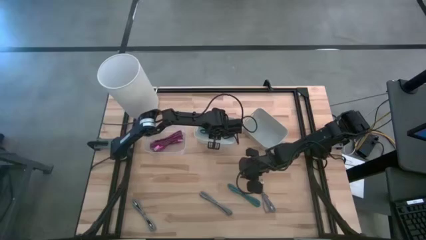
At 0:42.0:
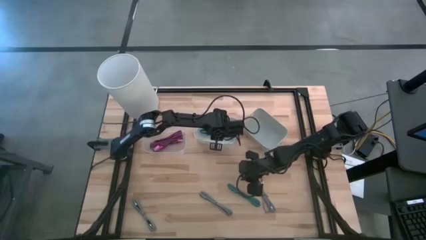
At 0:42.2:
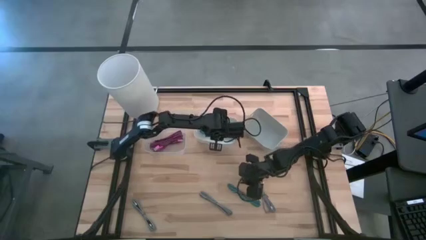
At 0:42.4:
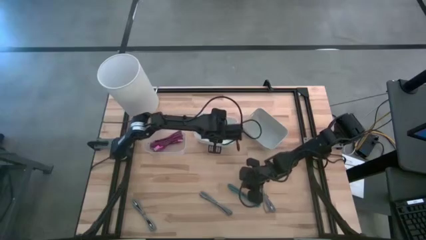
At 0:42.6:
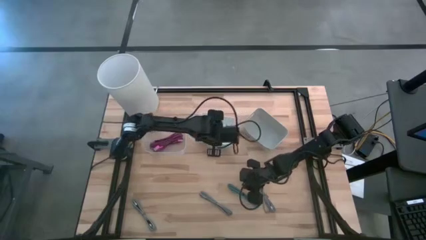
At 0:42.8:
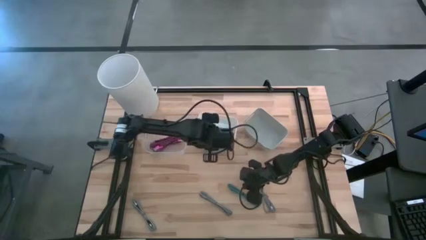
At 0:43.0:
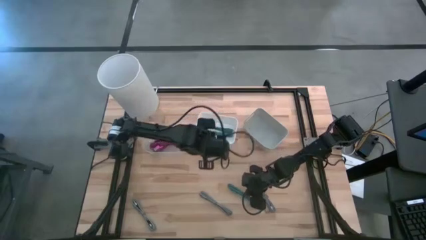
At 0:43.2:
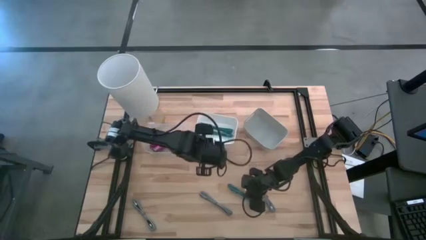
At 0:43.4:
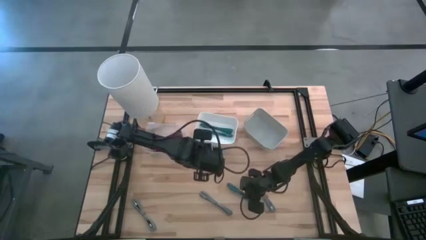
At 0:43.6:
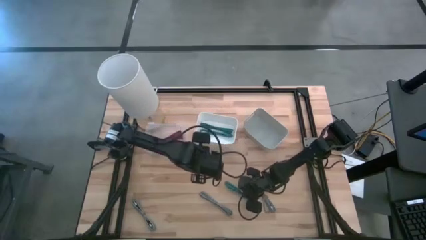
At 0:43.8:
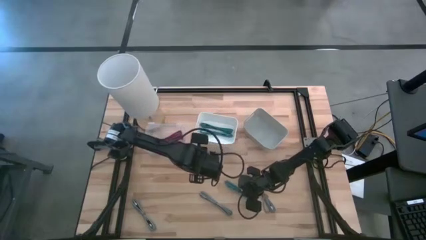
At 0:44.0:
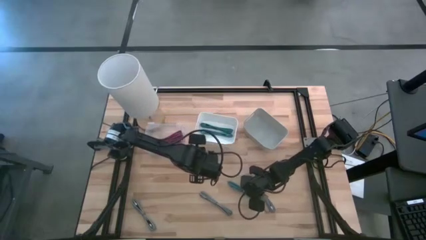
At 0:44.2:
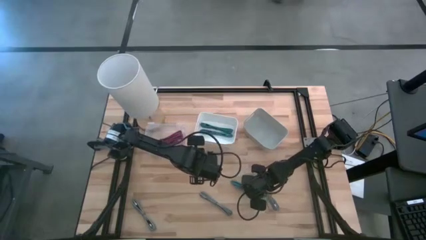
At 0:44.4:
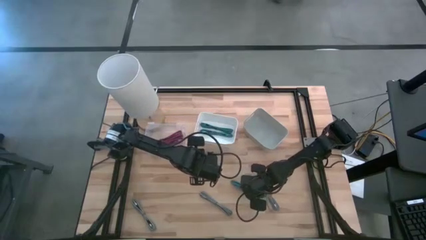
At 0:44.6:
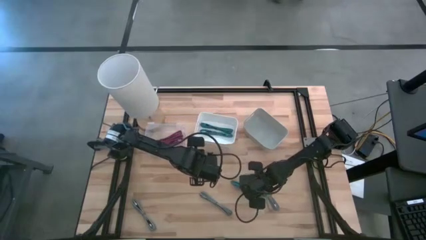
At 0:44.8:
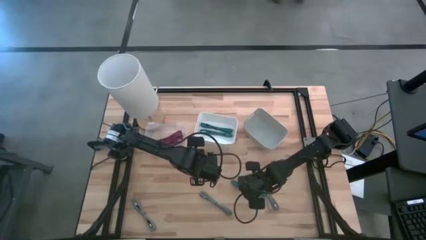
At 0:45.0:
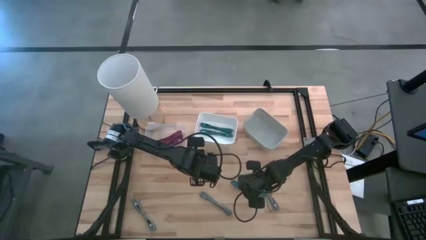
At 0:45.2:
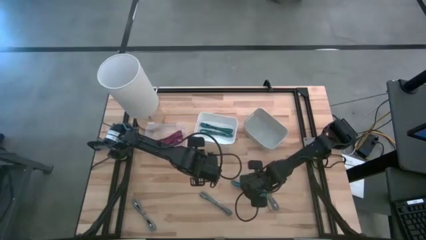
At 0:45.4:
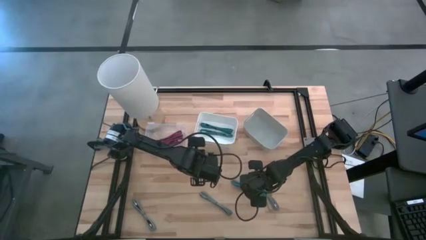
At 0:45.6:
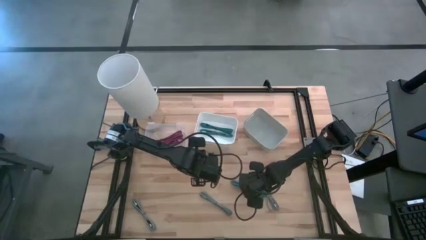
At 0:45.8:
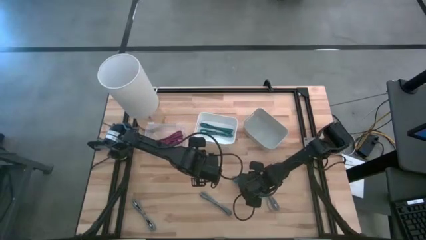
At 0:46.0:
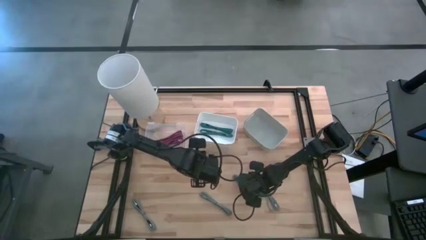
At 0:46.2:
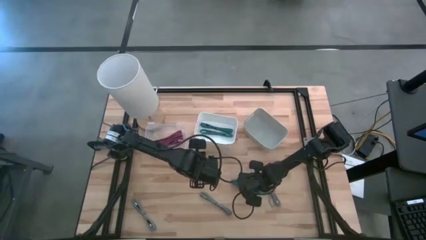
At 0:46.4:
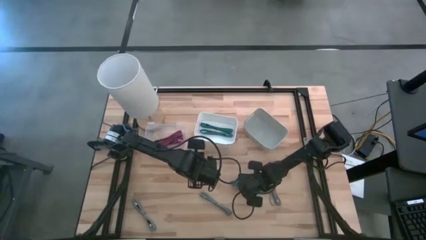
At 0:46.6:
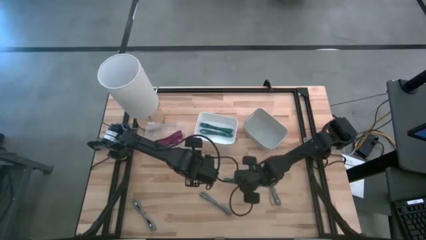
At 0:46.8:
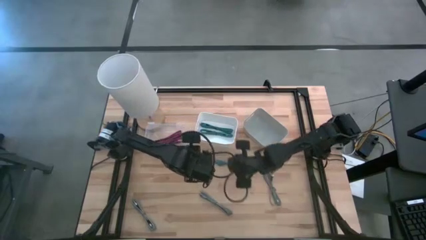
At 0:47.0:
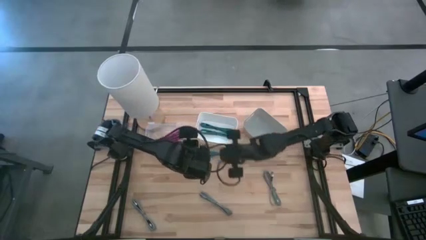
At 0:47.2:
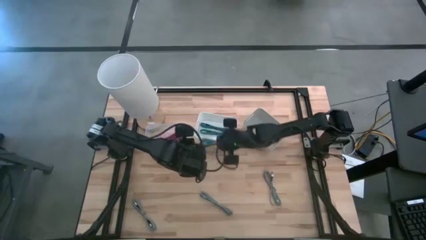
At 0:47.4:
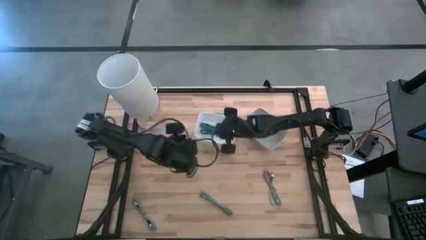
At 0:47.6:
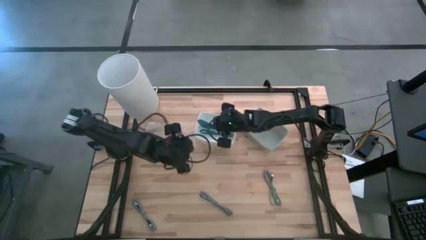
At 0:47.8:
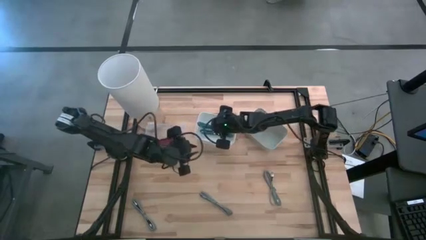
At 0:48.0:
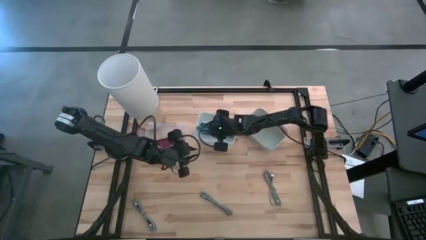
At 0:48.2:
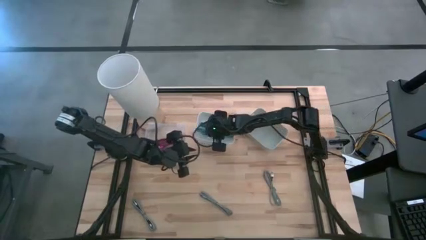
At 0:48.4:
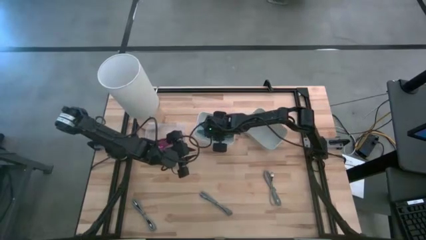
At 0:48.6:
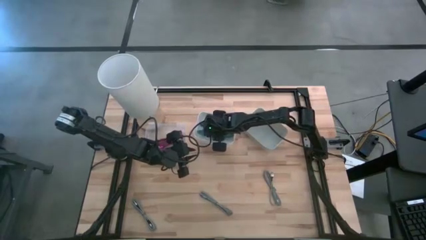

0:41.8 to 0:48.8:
Task: Pick & Place USB Port
Put the blue patterned charger cable into the white bin

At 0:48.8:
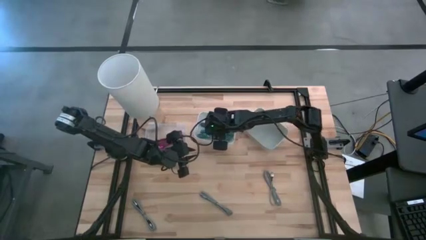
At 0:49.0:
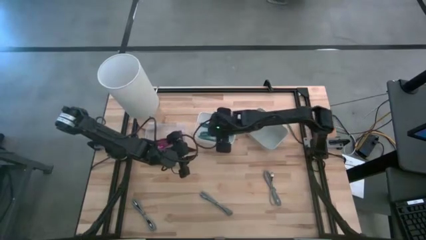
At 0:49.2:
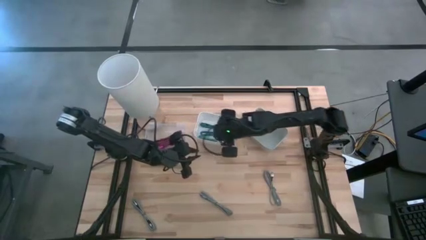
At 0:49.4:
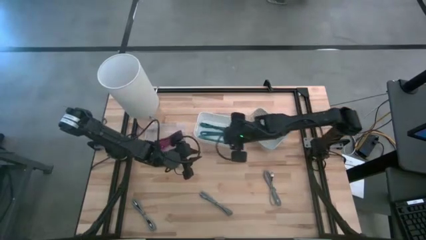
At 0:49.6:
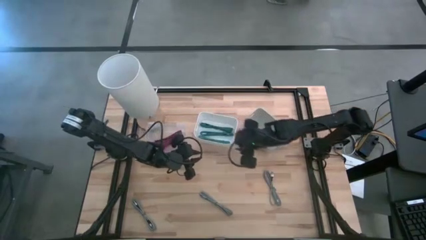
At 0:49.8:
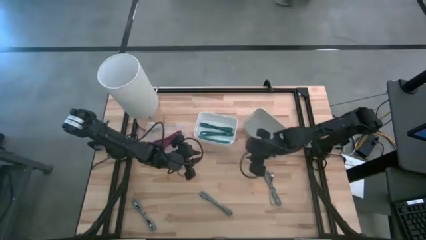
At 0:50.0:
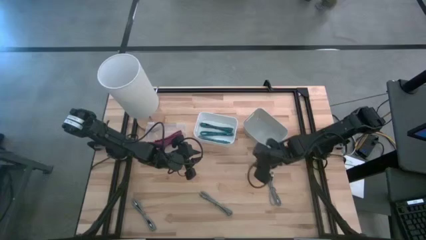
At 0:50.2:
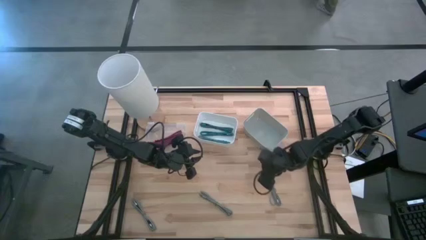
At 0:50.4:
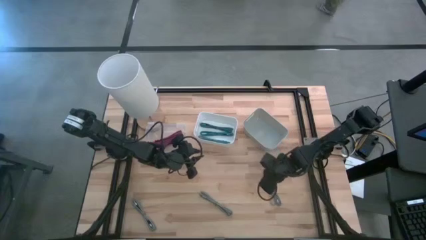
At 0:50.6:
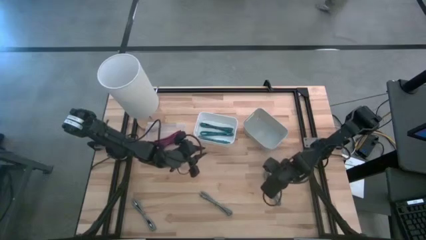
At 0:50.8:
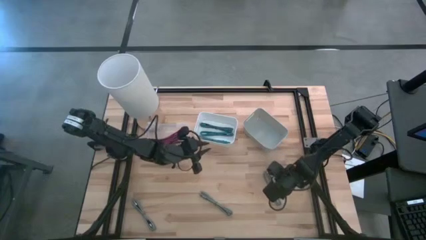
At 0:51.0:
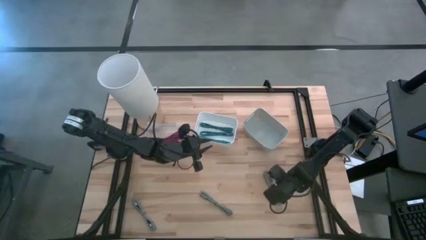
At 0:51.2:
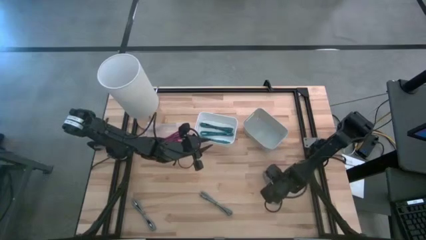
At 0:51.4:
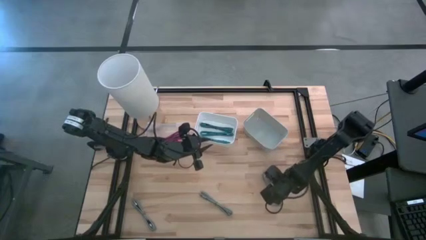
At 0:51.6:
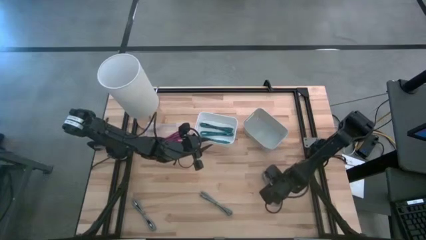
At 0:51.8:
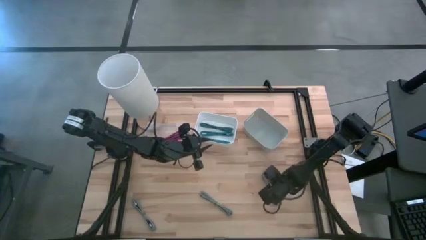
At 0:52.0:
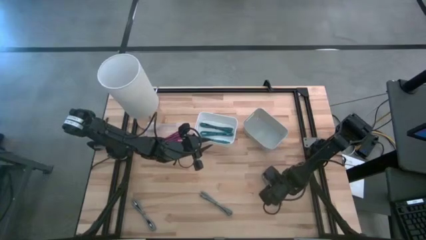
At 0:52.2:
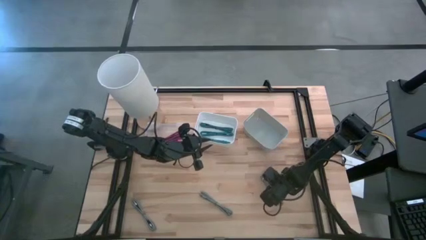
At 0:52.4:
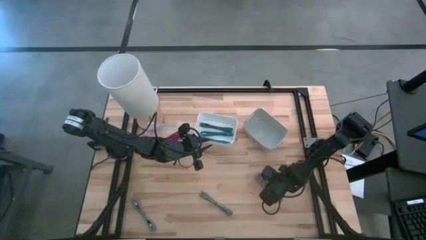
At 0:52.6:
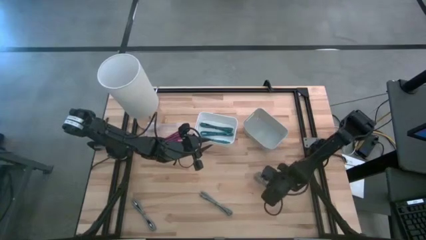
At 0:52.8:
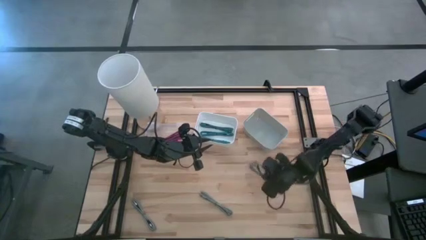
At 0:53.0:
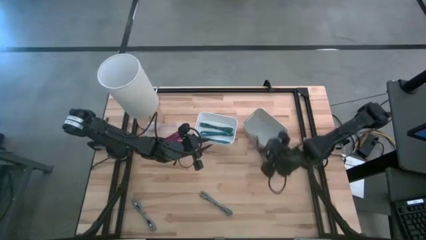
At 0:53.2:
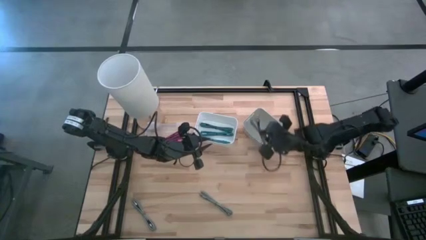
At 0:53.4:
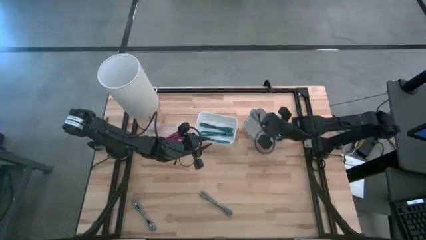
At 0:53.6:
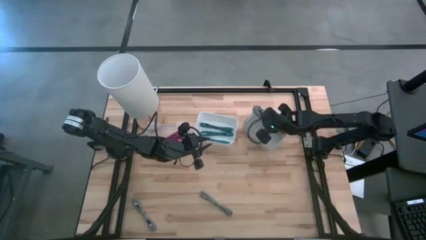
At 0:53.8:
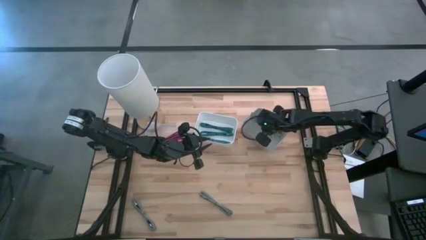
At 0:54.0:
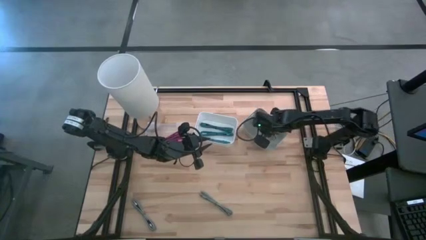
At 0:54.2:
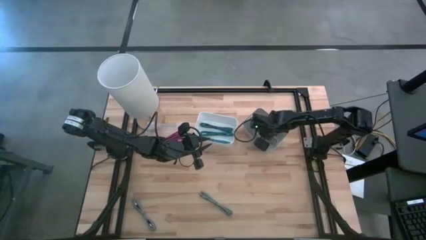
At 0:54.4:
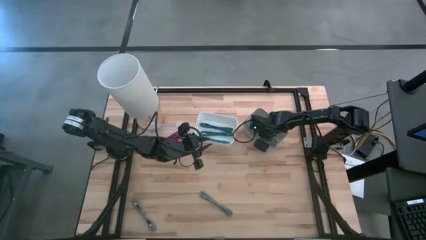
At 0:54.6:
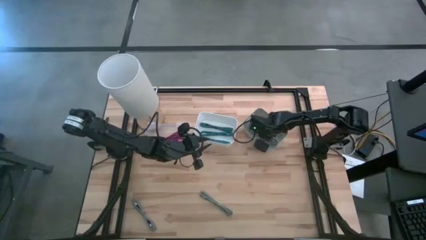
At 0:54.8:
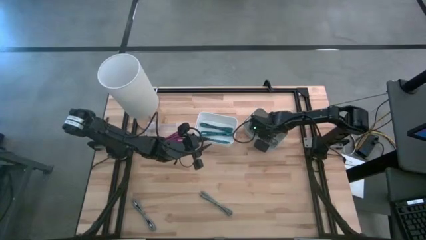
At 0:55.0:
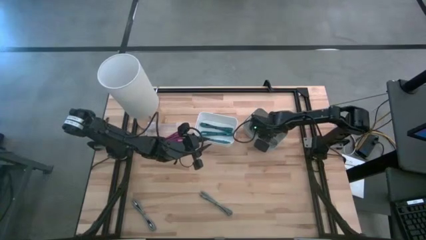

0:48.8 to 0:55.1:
Put the right black patterned charger cable into the gray bin

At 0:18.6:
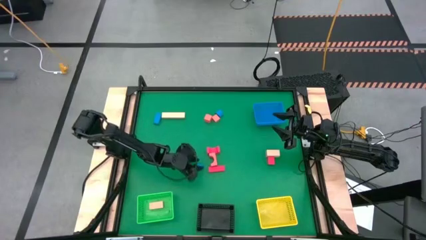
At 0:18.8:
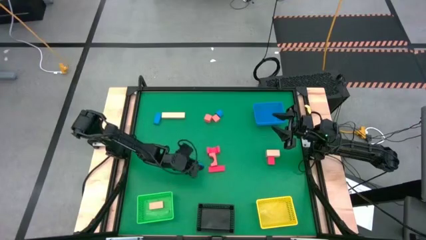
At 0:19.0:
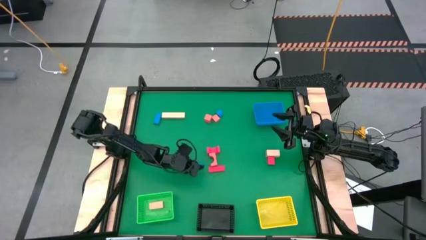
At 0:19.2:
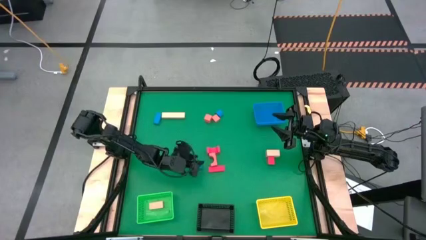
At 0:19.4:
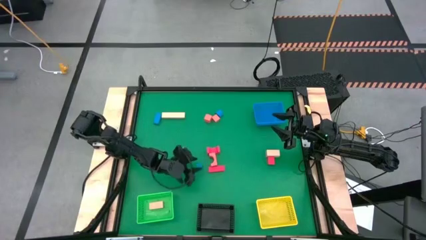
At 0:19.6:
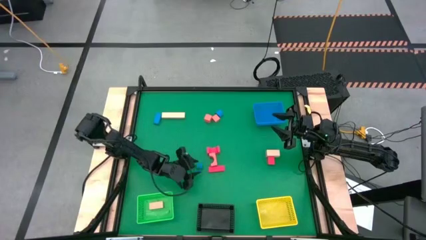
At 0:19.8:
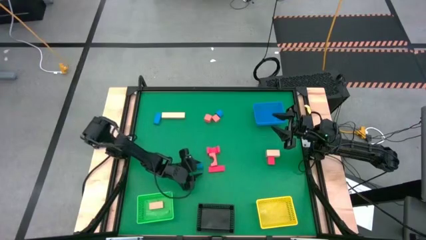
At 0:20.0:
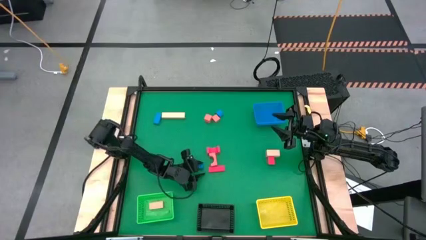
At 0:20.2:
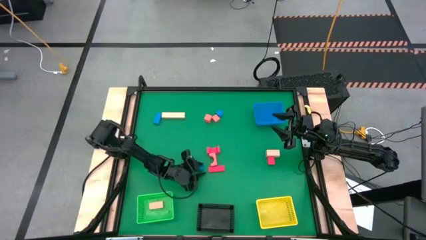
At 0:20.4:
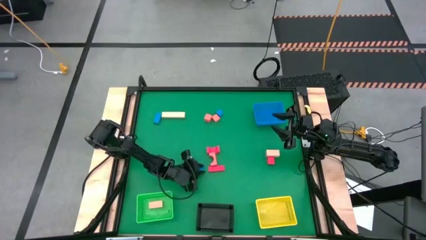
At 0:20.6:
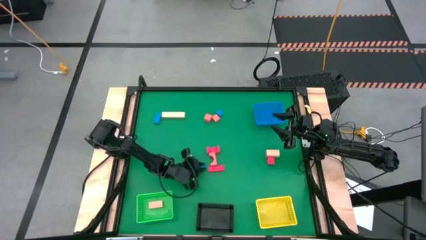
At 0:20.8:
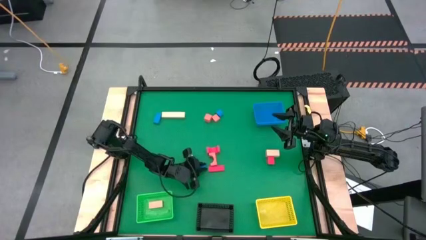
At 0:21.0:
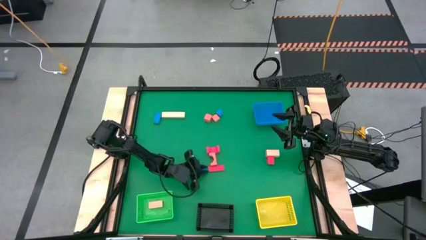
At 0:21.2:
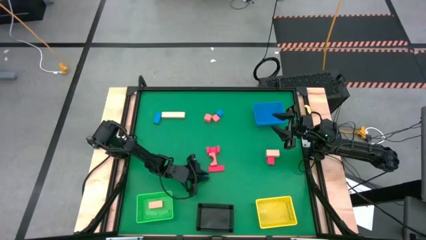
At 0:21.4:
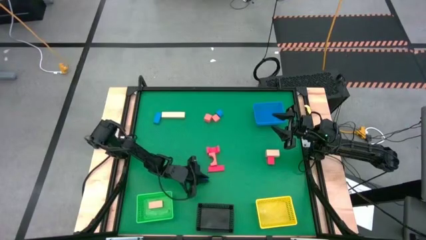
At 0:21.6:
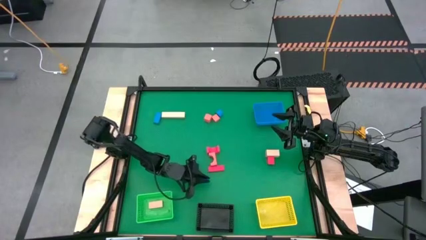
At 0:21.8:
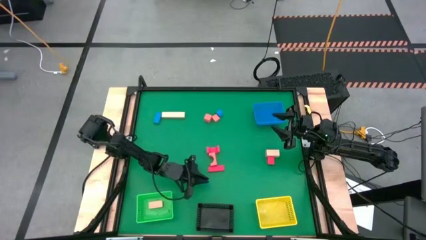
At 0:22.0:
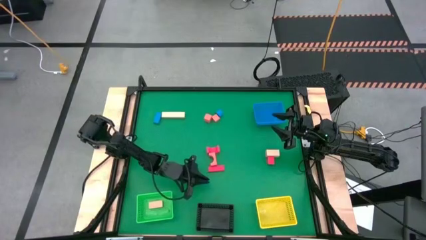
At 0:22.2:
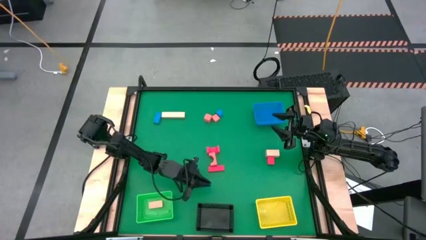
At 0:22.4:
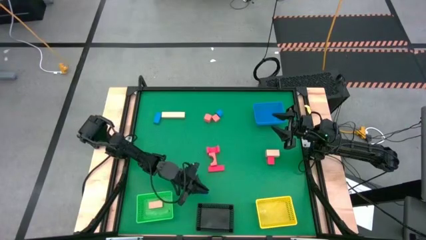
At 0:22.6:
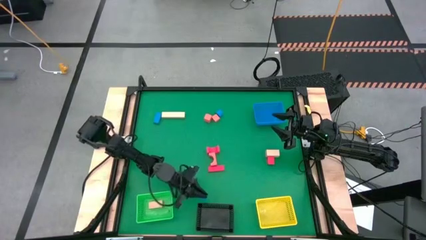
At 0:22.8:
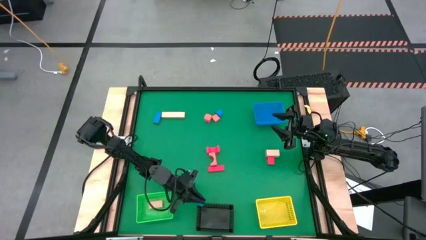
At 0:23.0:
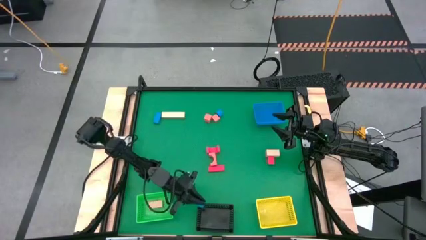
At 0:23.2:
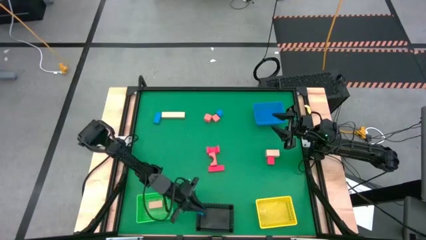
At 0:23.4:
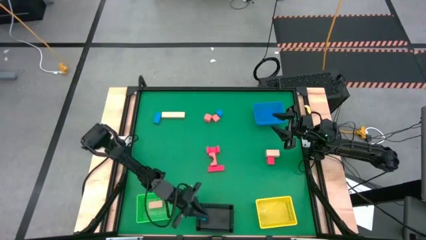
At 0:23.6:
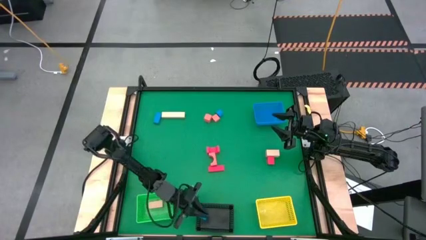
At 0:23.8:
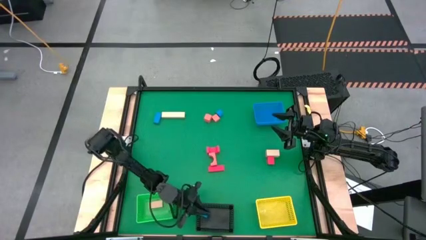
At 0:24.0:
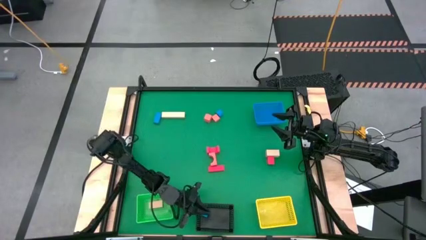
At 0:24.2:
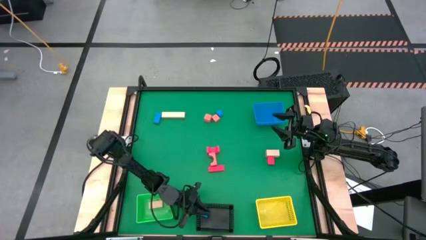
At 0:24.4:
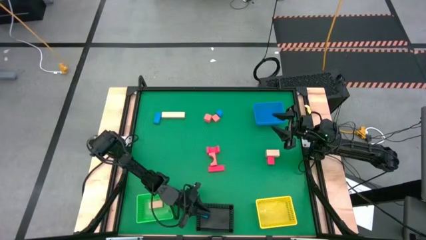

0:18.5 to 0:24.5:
Task: Sort & place blocks by color
Put the blue block into the black bin
